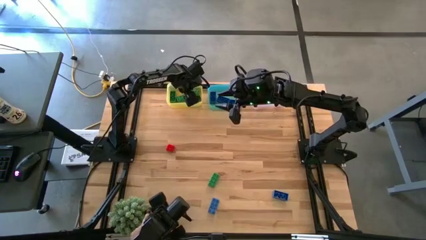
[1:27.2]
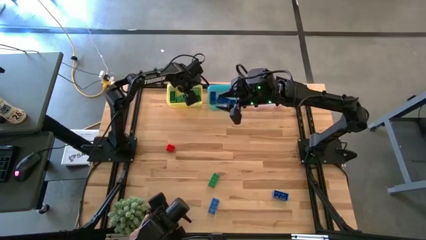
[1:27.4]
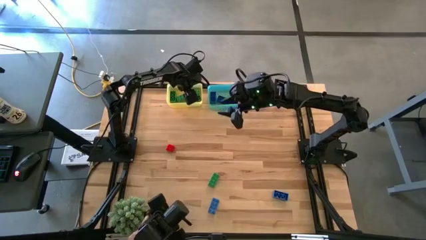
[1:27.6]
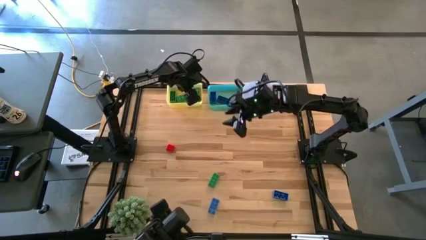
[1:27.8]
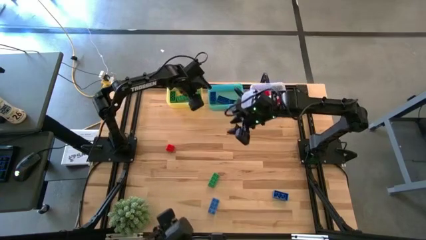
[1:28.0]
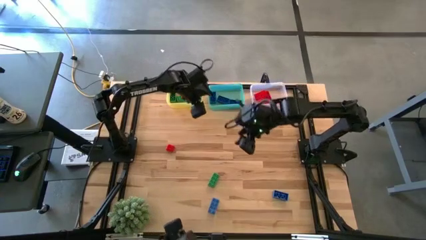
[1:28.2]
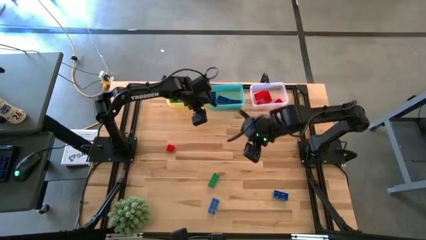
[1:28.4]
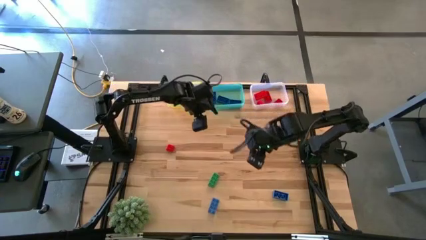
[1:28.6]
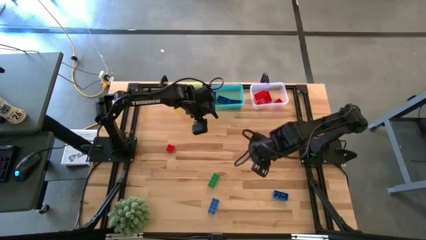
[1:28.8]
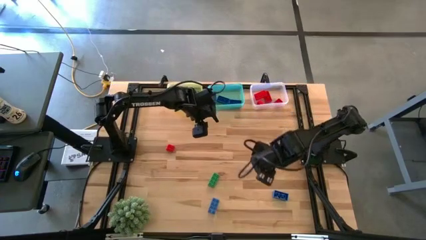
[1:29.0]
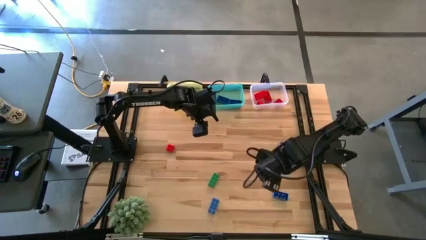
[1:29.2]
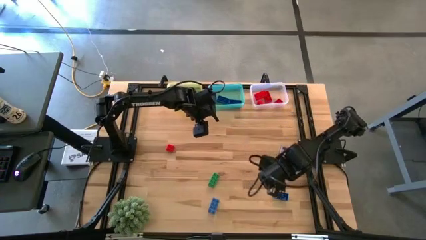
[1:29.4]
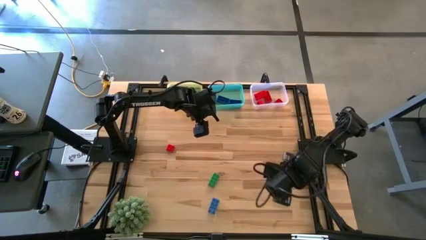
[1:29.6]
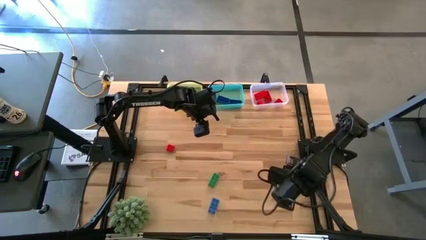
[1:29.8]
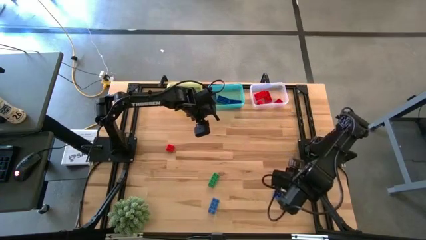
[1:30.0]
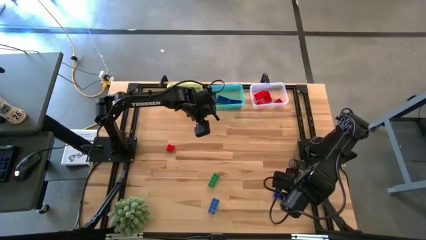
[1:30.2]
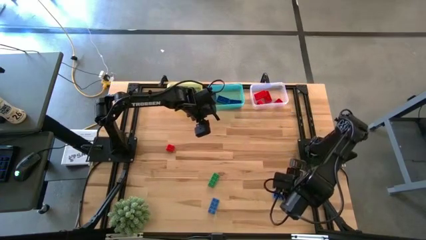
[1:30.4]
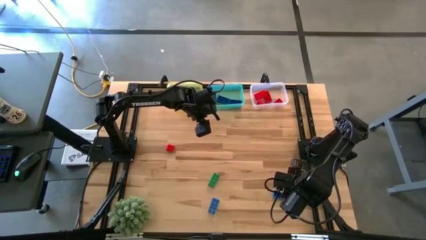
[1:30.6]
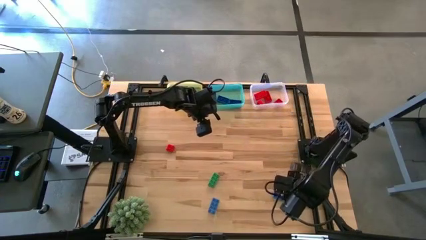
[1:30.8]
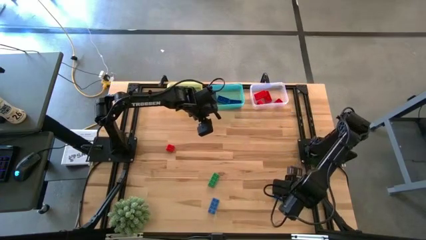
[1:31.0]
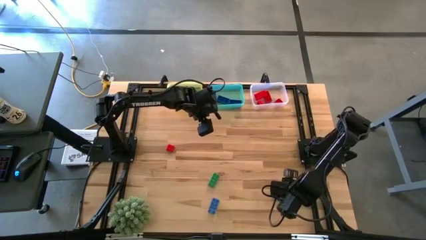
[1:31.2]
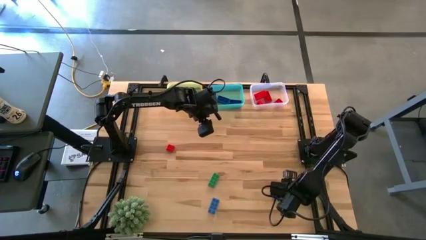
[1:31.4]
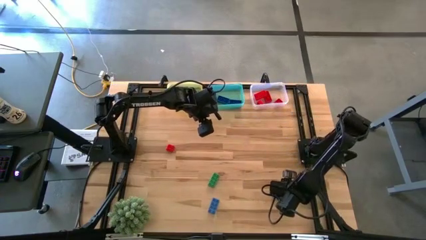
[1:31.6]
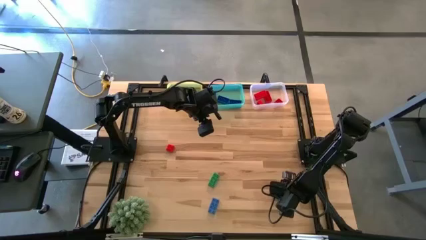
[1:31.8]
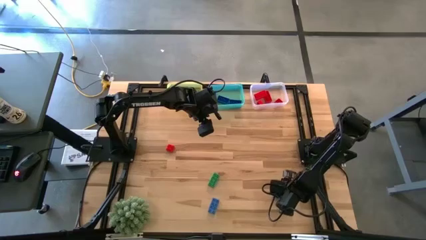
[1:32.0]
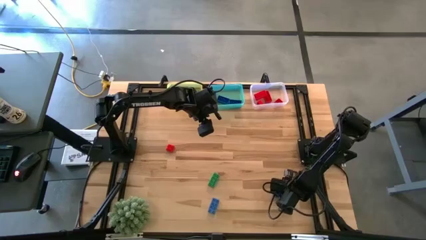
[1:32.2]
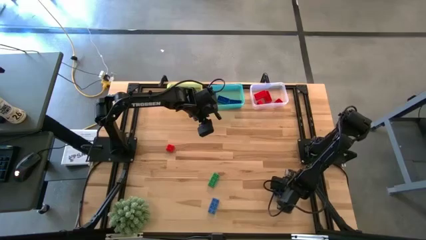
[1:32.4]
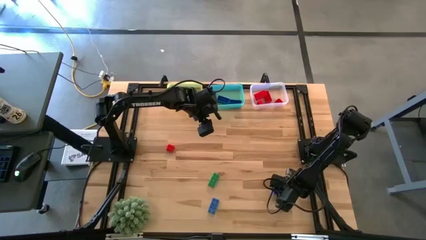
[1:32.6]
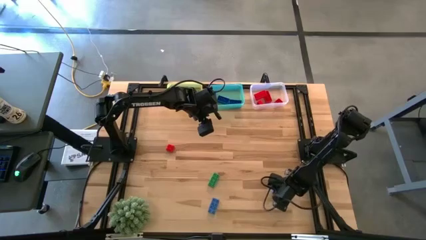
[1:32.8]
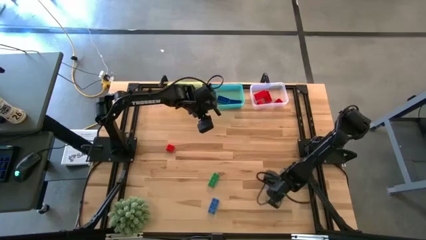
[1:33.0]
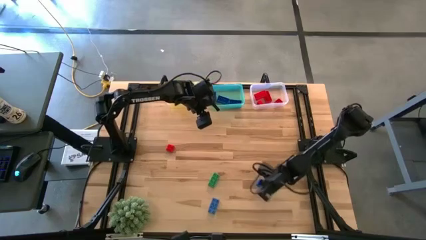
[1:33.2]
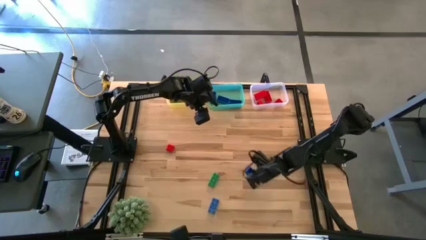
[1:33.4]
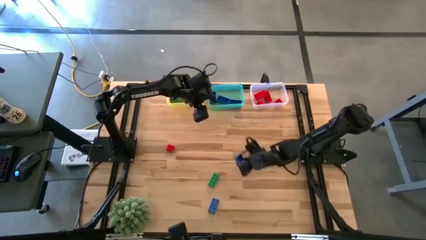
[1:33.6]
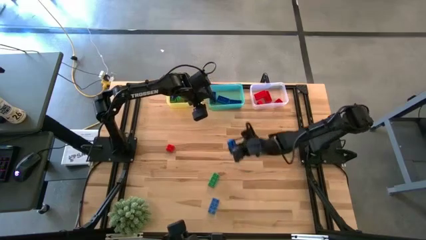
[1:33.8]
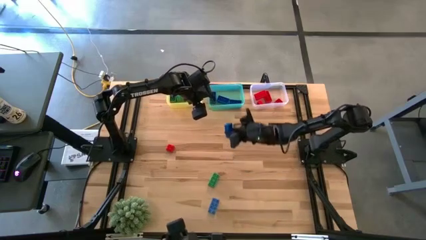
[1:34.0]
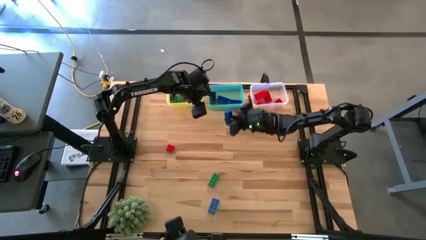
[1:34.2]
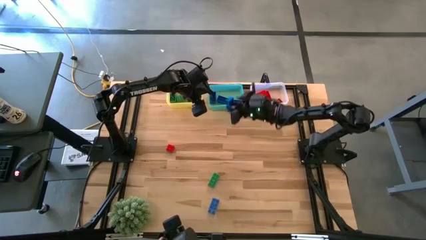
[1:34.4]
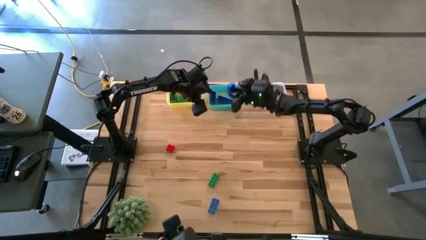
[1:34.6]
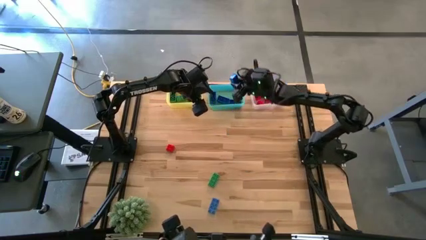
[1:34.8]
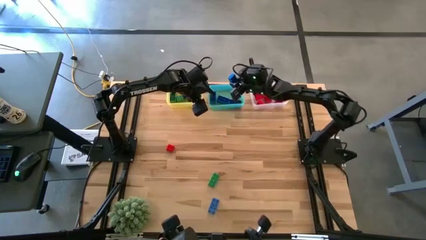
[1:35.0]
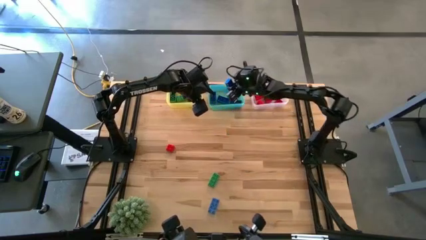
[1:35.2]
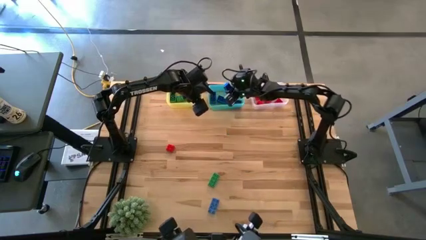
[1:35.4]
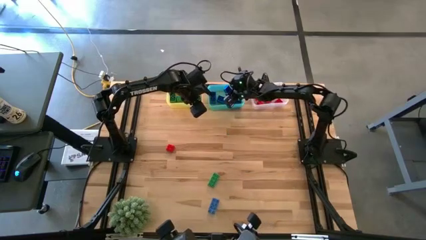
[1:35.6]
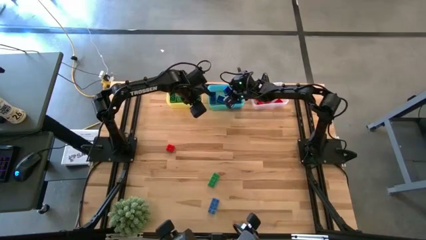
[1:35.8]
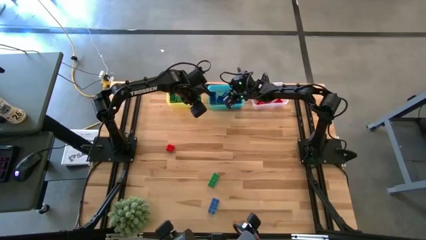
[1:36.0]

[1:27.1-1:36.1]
Task: Sort & place blocks by color
Put the blue game piece into the blue bin
